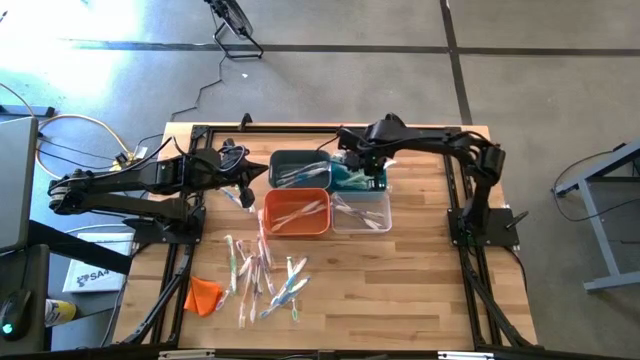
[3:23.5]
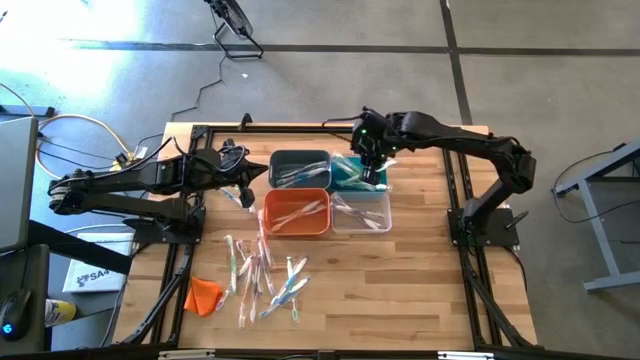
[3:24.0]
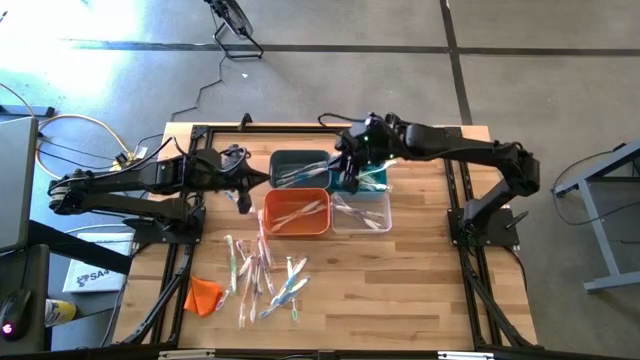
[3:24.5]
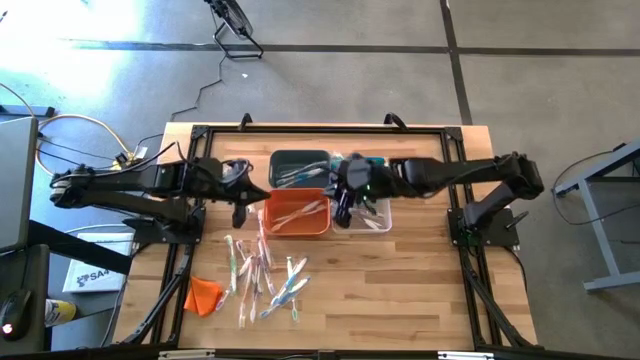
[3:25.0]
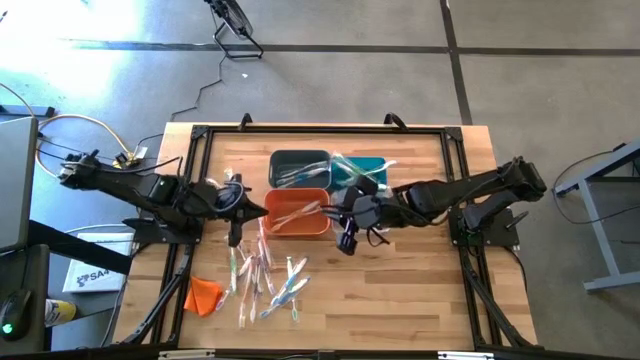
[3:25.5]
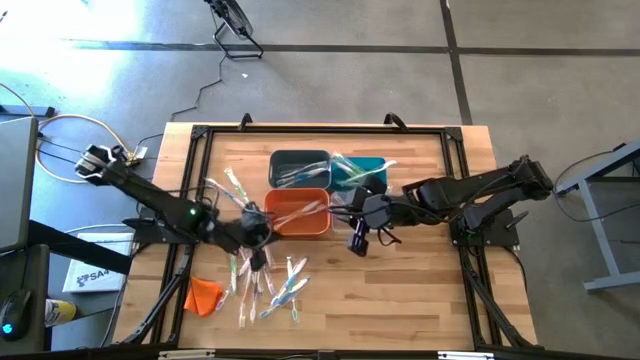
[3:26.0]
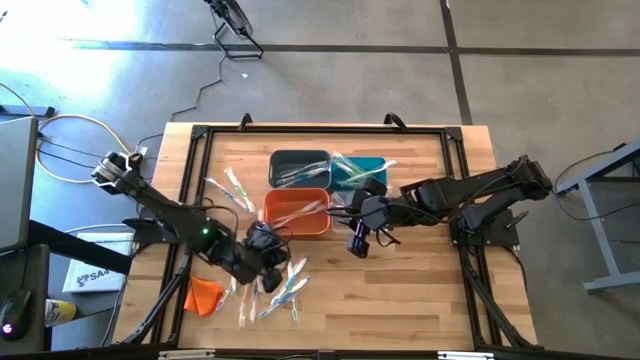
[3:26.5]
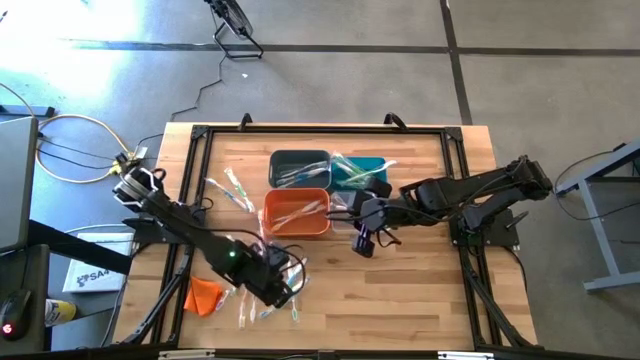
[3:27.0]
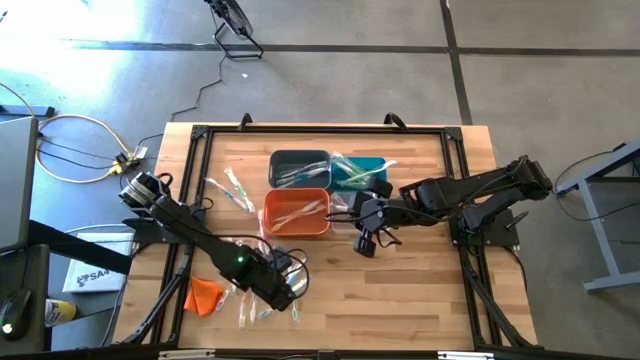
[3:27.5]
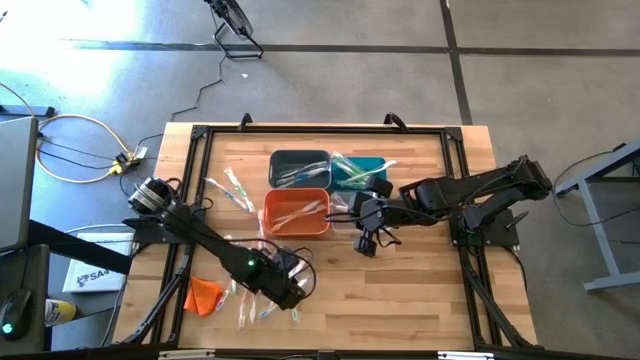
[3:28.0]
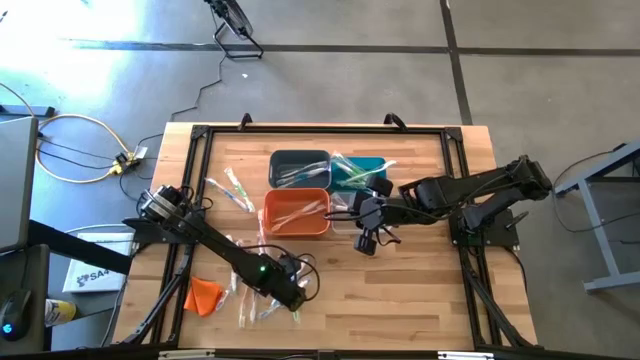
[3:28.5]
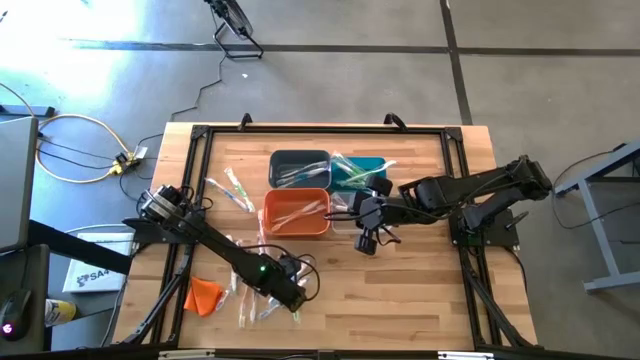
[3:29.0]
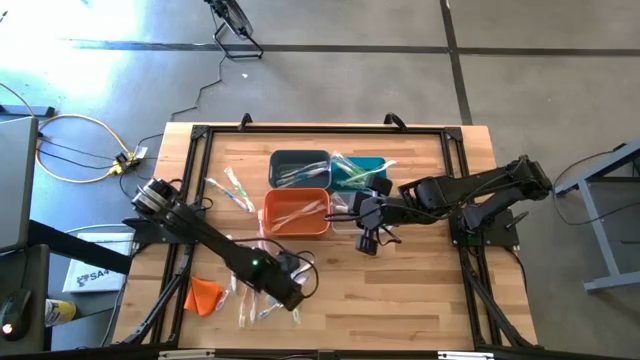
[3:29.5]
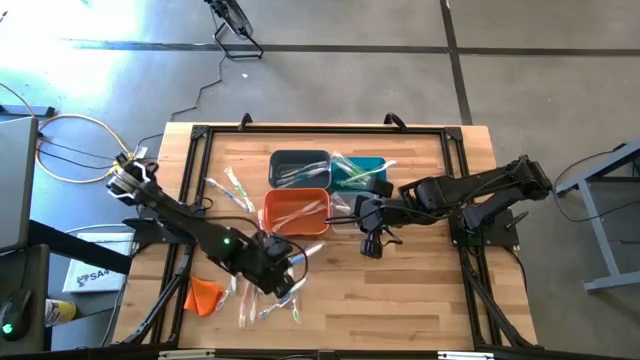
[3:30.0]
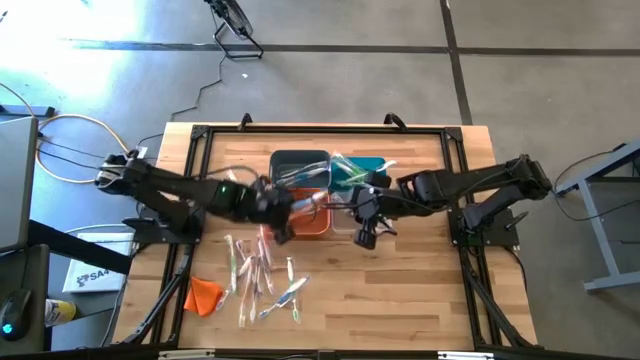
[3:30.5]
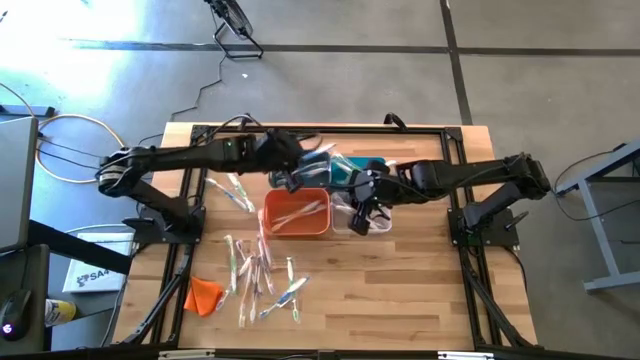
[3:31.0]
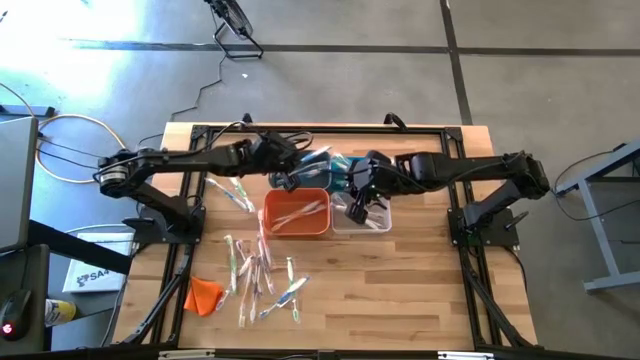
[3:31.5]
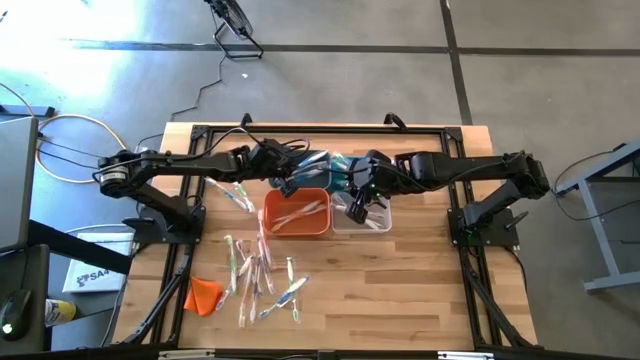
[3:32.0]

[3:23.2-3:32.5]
Task: Pick & Place Toothbrushes
Put the blue toothbrush into the left blue bin

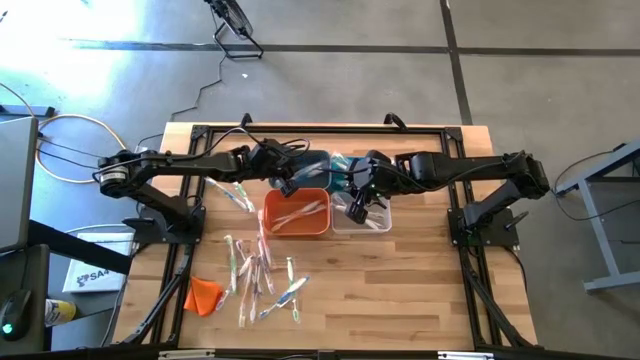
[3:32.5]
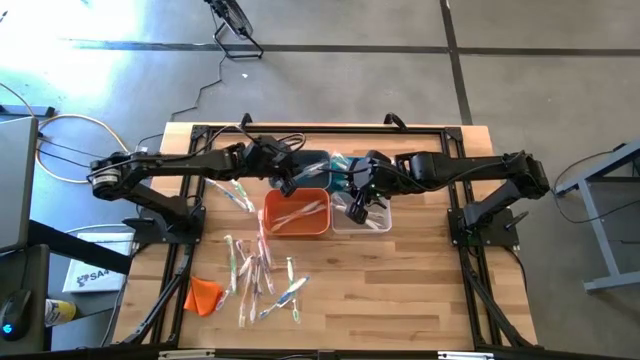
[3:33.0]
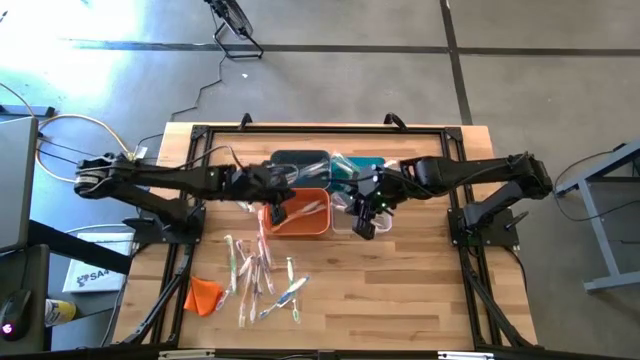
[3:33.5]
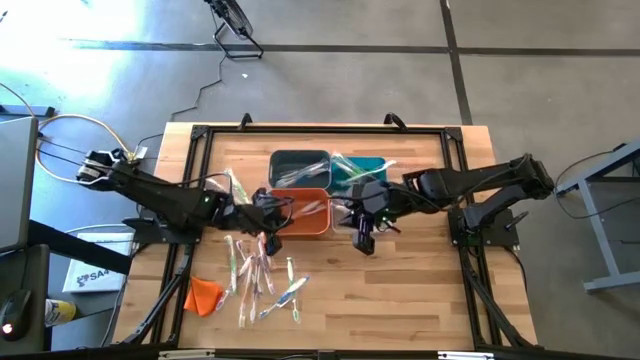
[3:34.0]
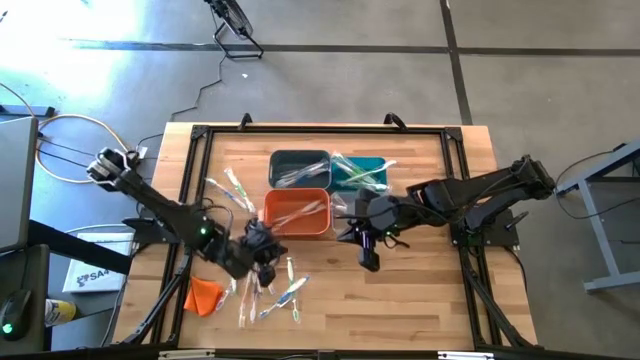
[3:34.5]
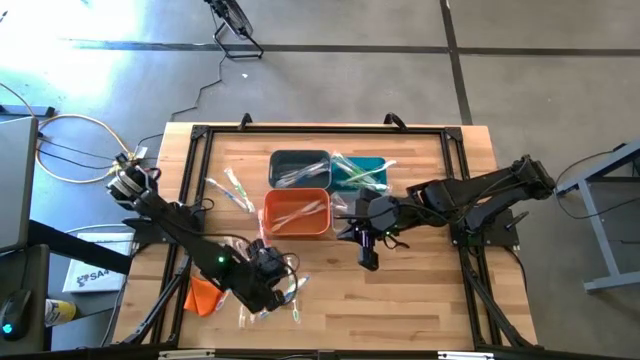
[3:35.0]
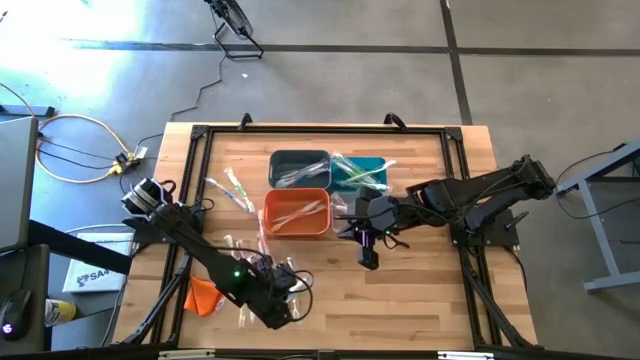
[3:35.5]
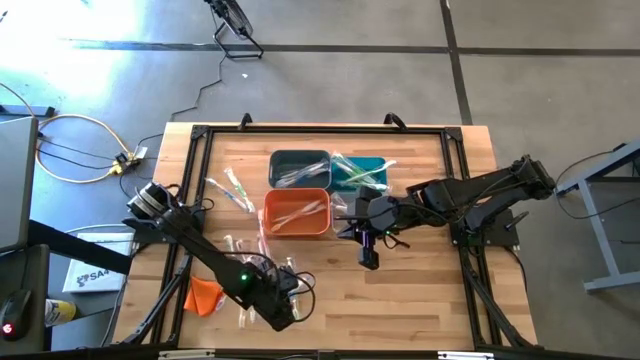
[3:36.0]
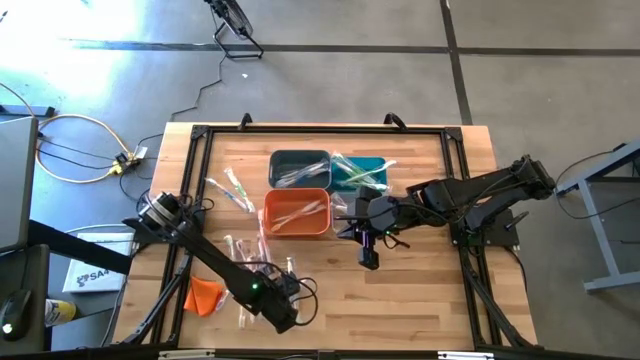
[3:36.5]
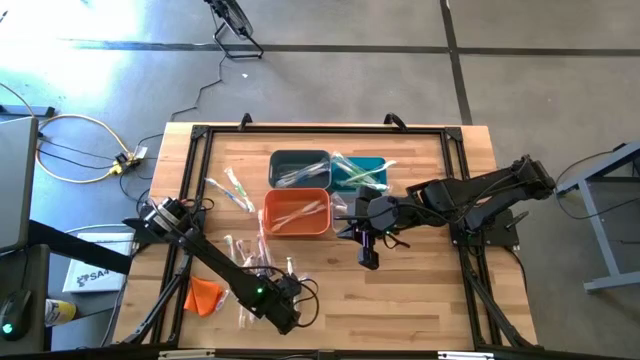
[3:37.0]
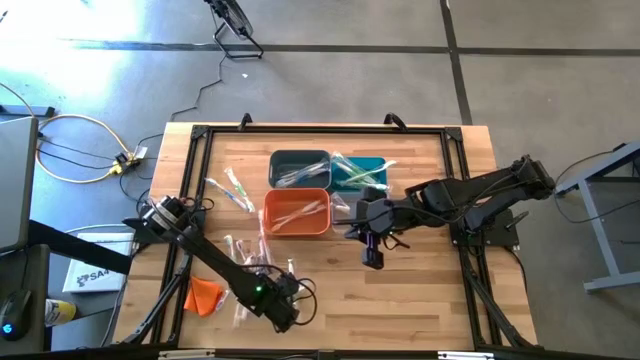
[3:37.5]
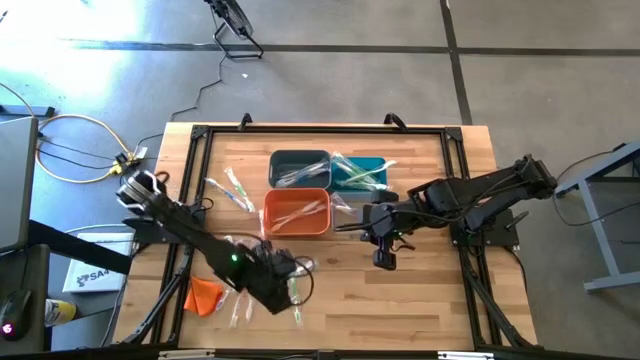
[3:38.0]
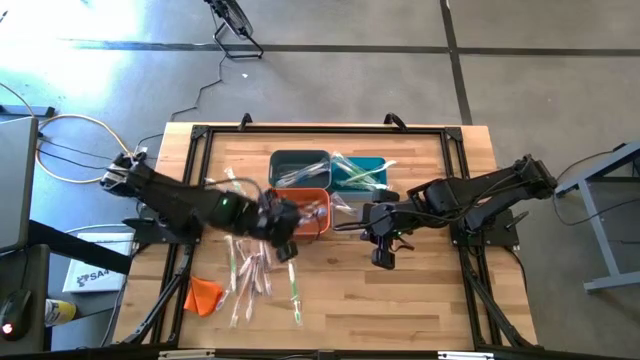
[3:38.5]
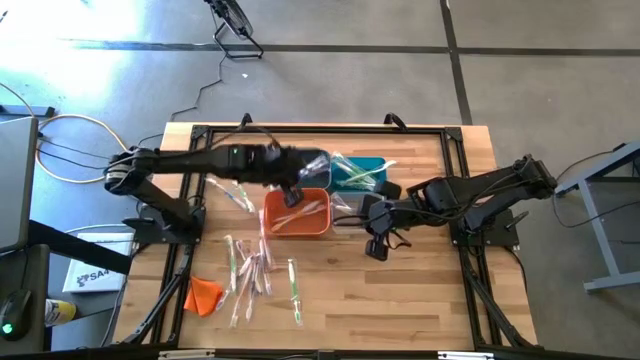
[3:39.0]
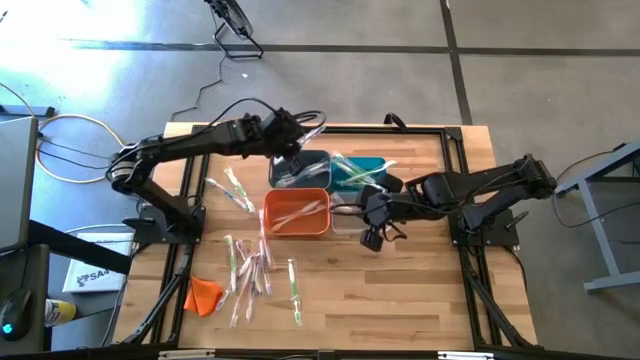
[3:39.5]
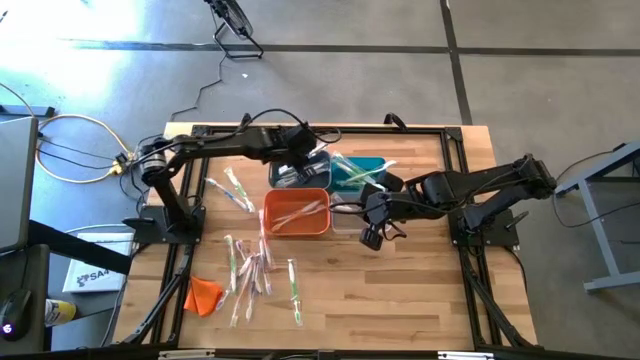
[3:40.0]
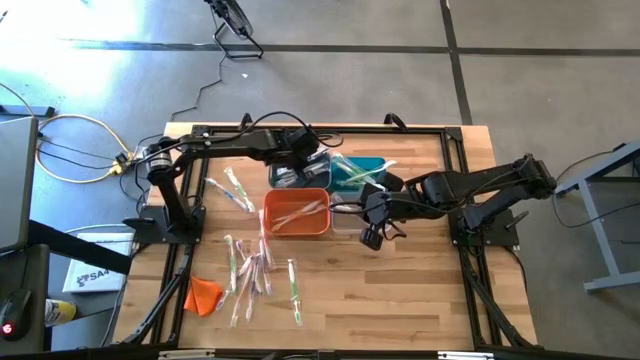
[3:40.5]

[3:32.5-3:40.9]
Put the blue toothbrush into the left blue bin

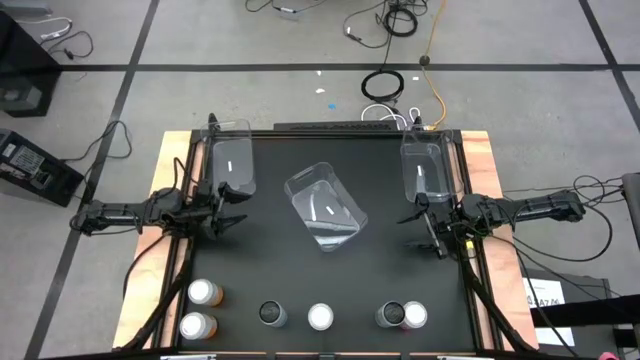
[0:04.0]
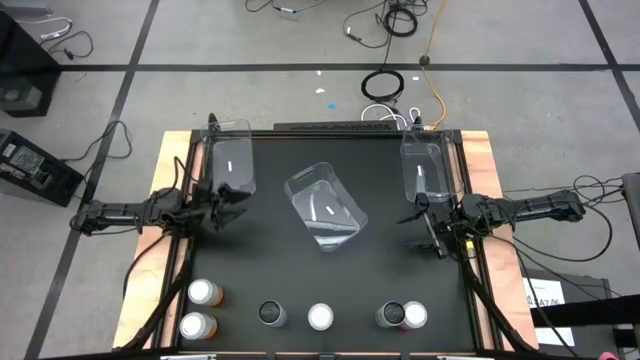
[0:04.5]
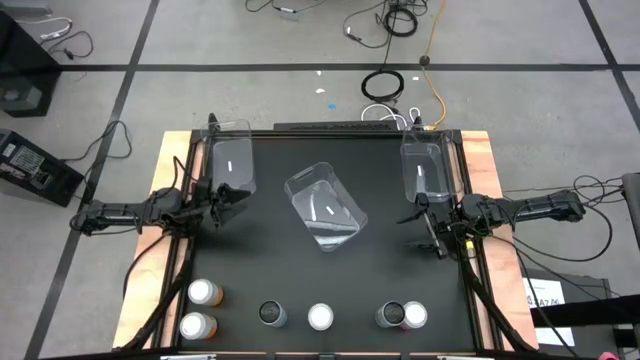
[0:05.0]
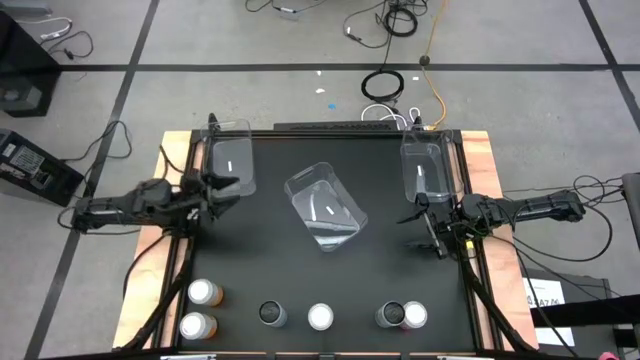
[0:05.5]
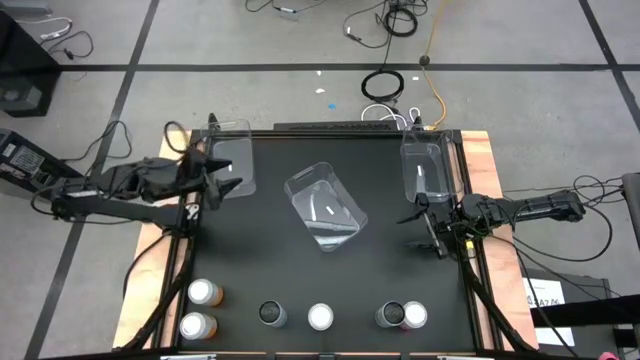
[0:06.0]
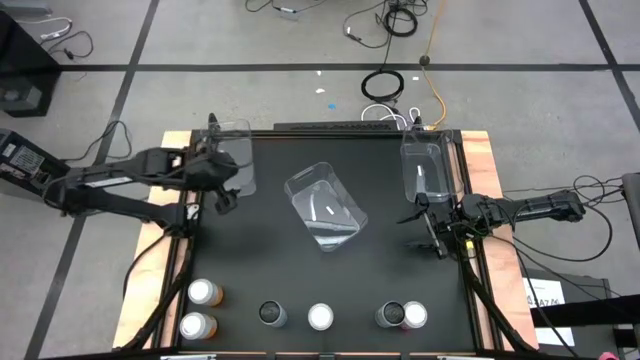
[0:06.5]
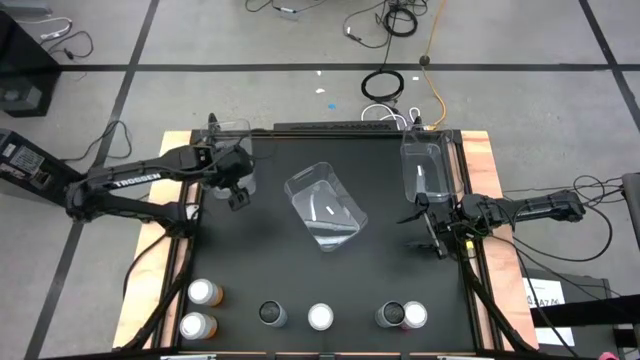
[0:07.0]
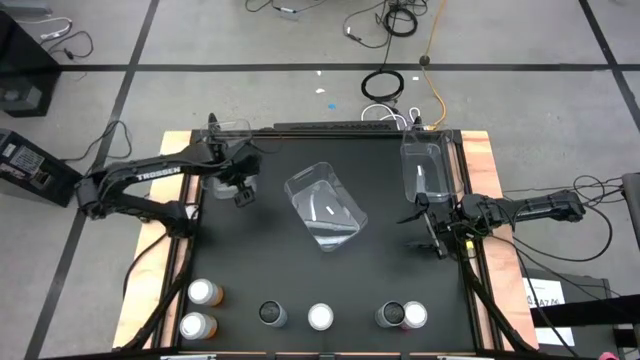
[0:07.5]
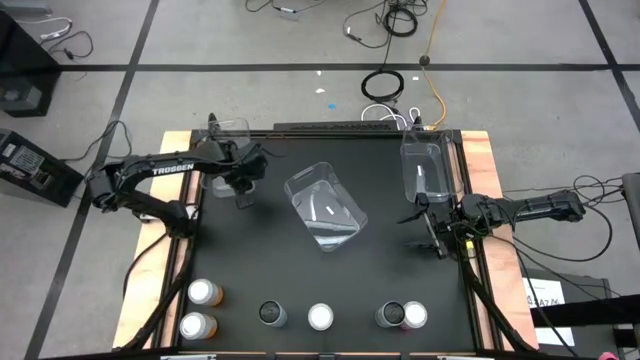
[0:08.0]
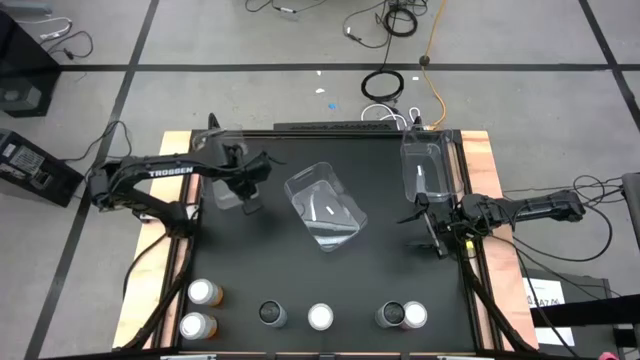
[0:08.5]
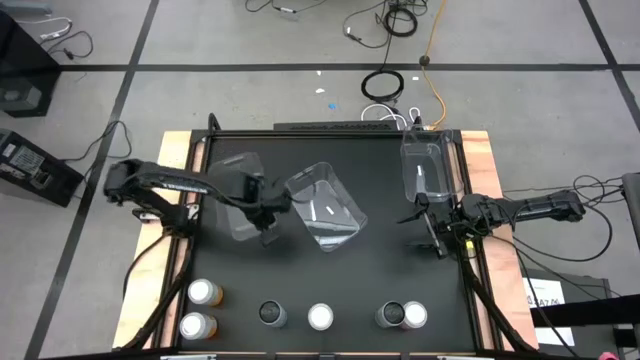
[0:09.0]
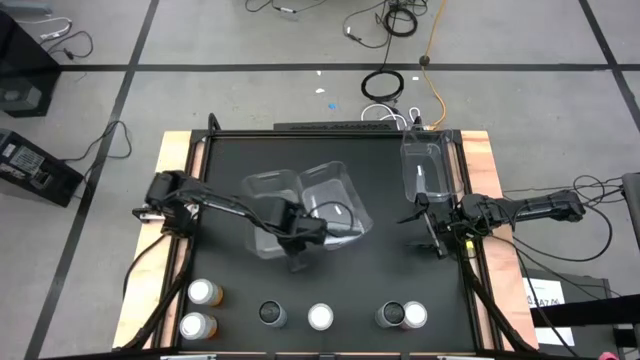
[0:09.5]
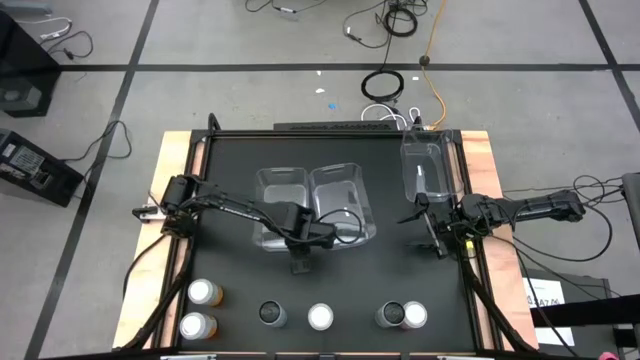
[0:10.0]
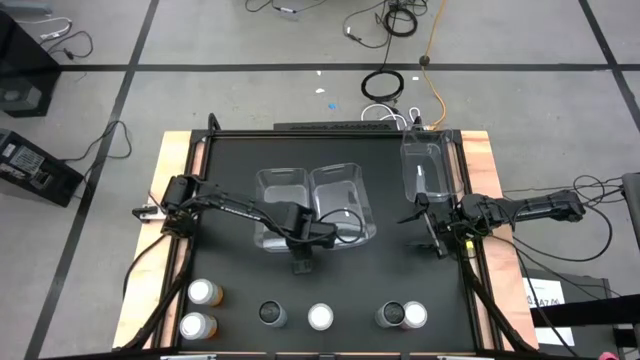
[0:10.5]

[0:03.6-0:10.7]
Task: Sort soda cans
Move the left transparent bin to the center of the table
